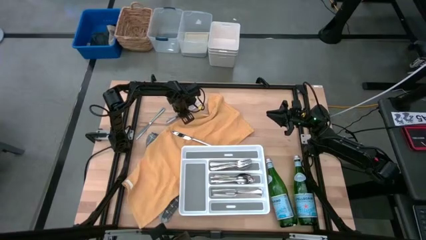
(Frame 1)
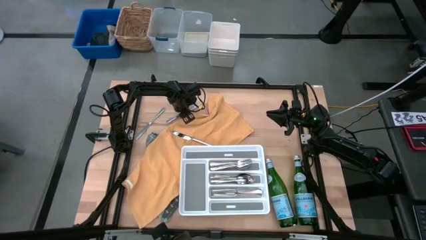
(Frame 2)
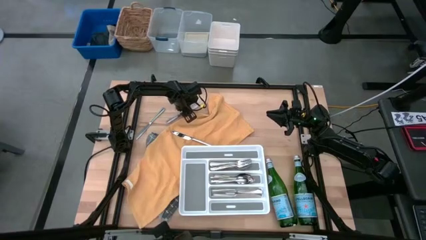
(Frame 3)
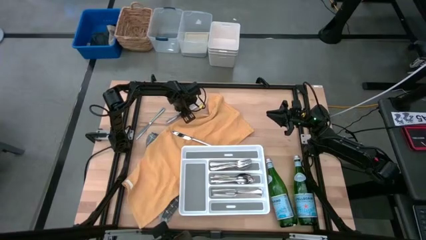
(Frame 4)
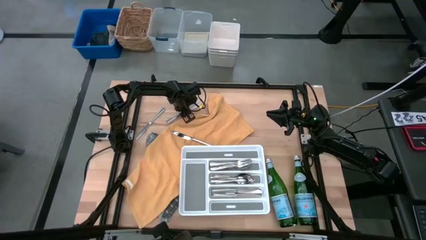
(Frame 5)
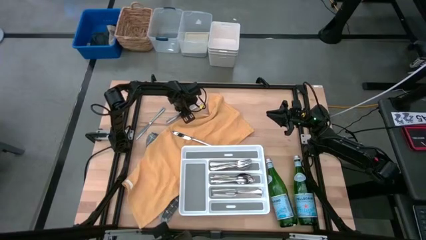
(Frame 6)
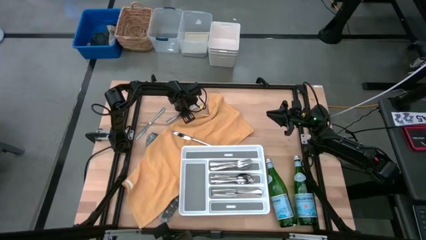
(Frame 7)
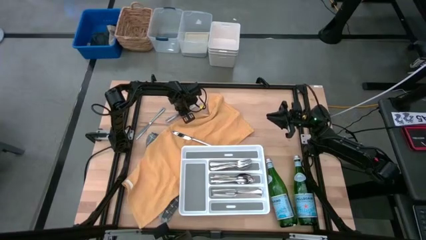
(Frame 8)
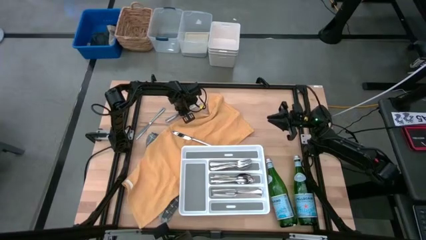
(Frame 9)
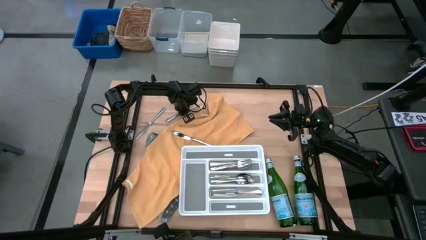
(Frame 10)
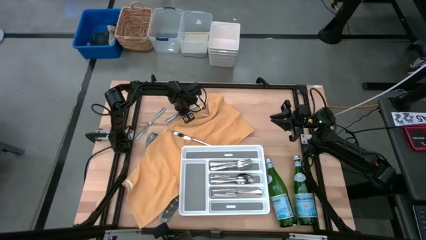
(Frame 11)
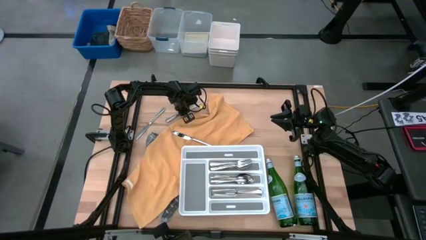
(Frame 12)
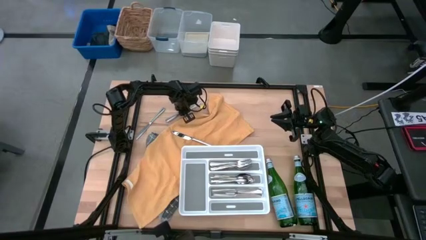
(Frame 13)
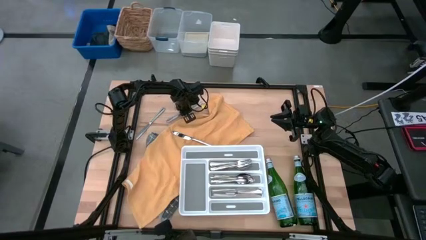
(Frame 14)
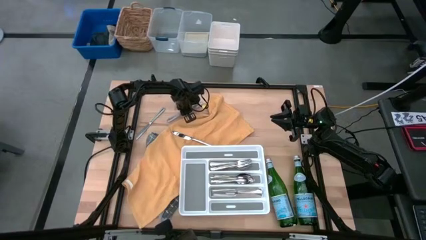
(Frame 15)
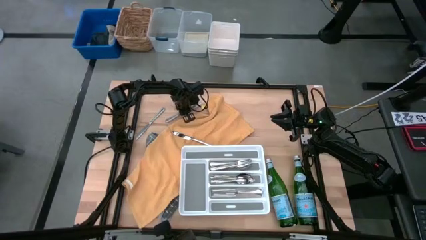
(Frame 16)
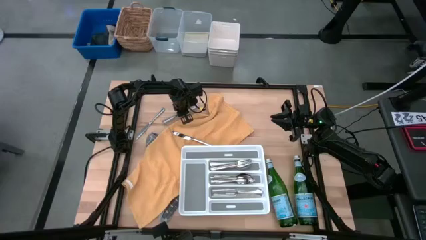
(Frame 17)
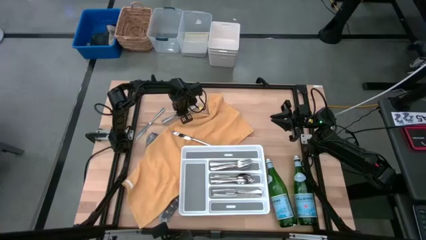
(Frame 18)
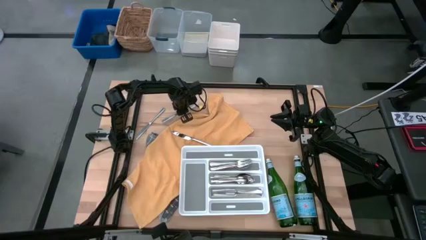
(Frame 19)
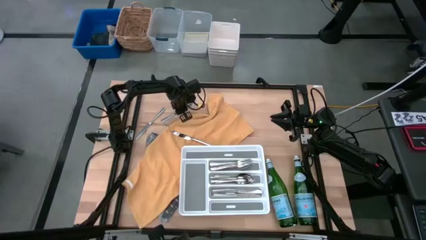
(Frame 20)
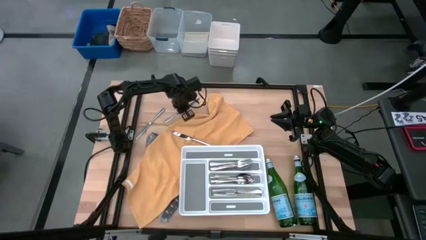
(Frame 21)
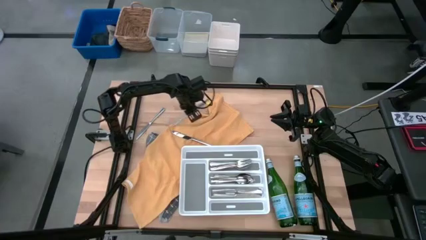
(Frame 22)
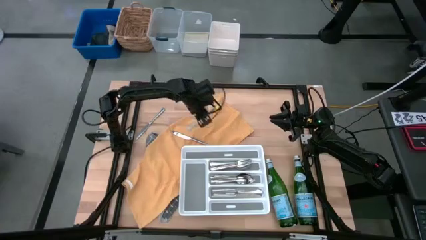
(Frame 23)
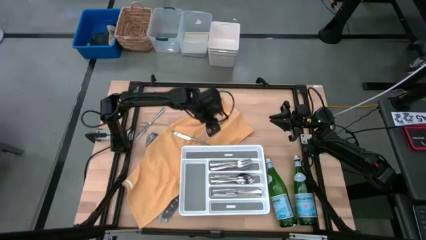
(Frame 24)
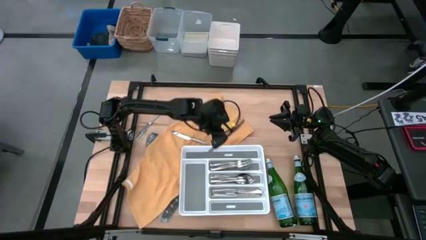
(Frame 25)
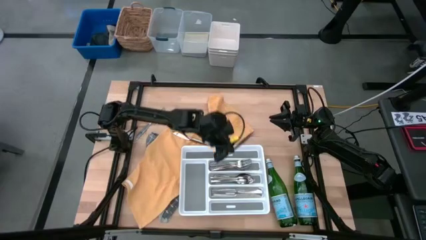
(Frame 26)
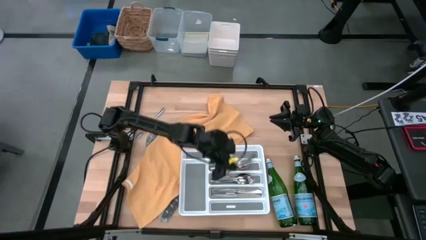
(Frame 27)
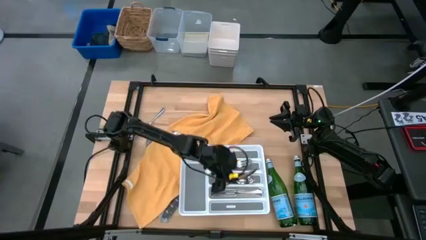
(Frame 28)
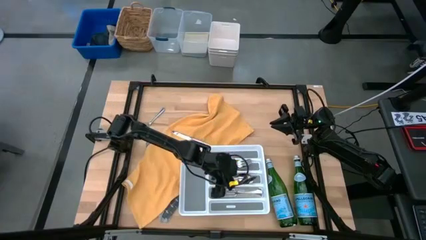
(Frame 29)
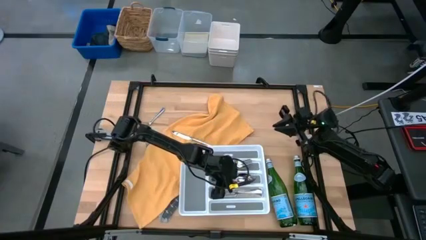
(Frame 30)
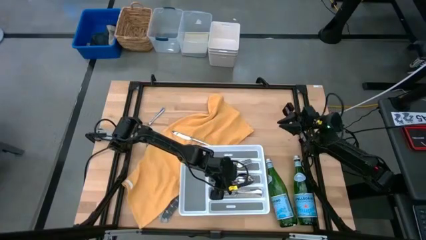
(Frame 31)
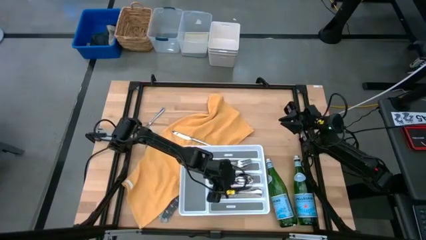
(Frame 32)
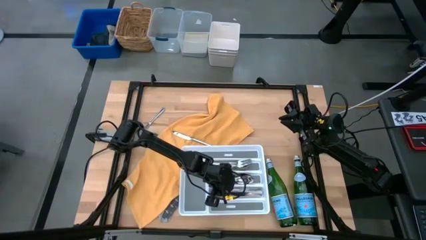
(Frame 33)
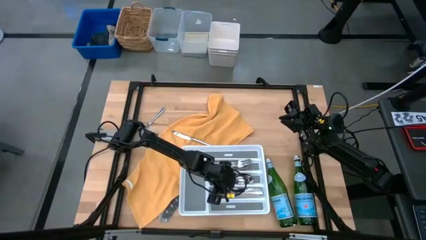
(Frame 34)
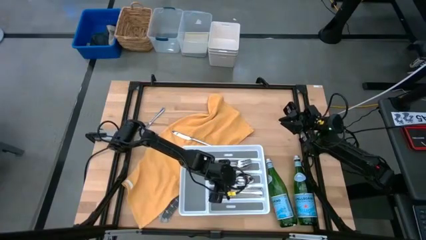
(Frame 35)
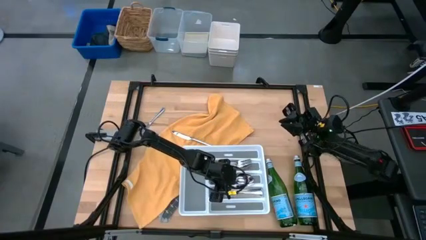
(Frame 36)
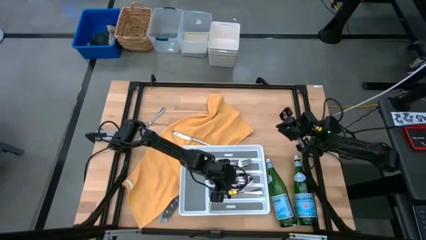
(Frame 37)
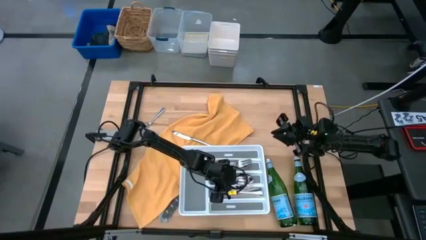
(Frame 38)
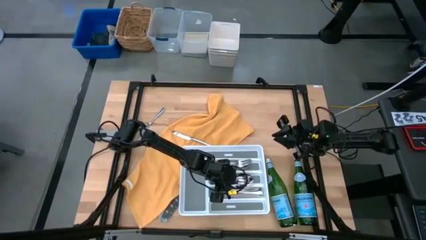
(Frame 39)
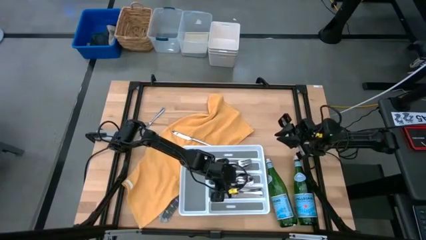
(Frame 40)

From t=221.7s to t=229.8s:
Task: Sort silverware
Put the silver table knife into the white silverware tray

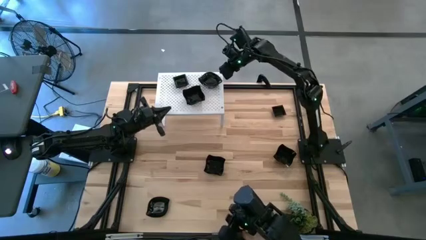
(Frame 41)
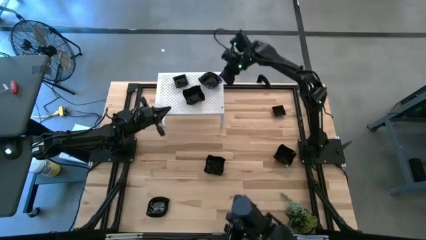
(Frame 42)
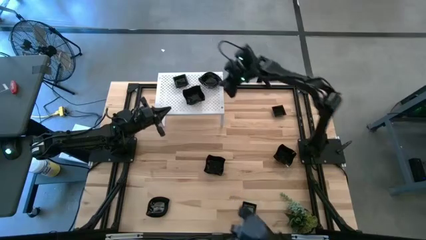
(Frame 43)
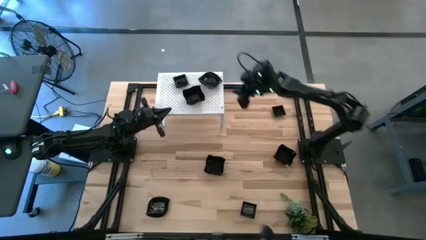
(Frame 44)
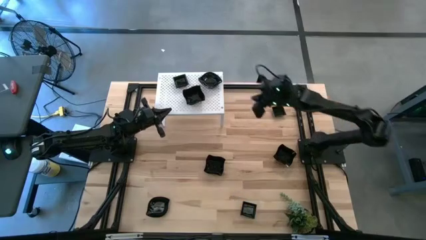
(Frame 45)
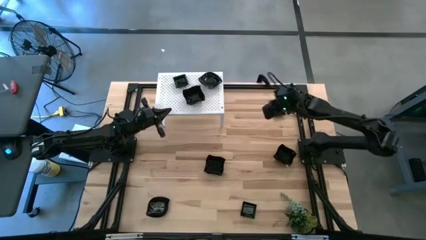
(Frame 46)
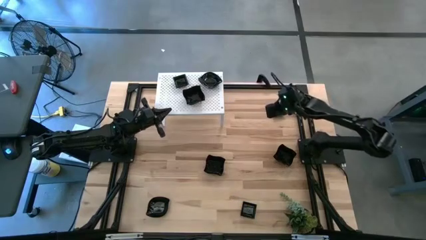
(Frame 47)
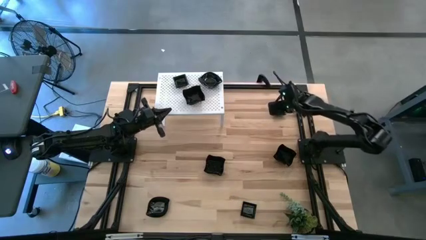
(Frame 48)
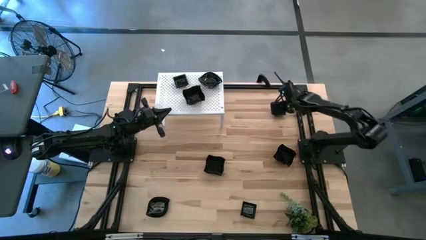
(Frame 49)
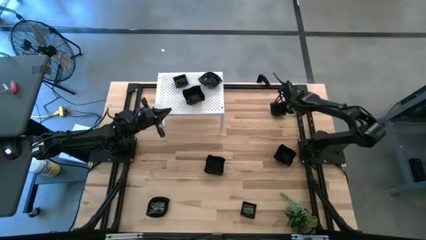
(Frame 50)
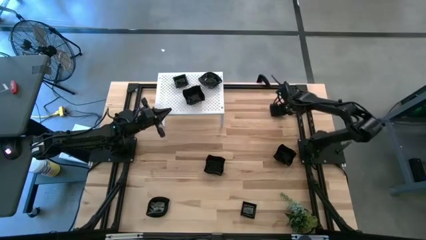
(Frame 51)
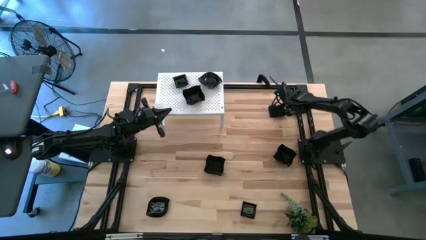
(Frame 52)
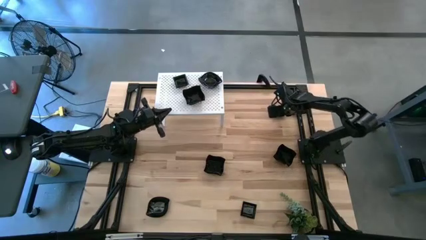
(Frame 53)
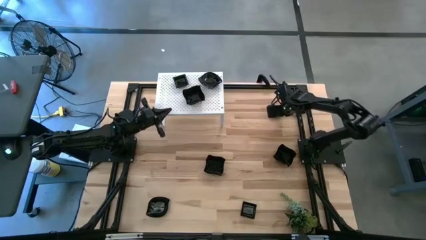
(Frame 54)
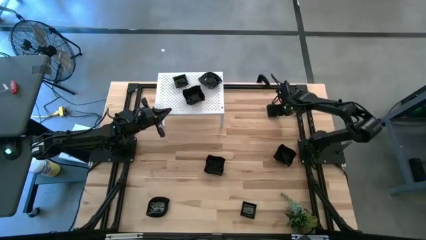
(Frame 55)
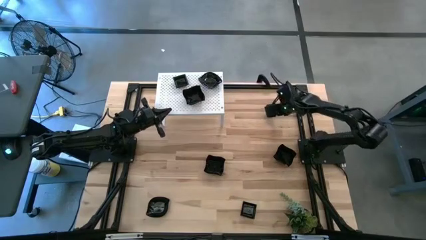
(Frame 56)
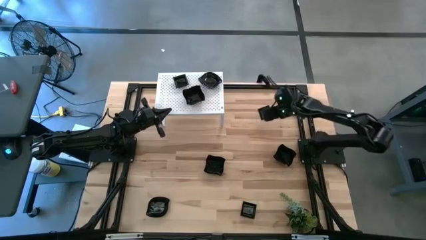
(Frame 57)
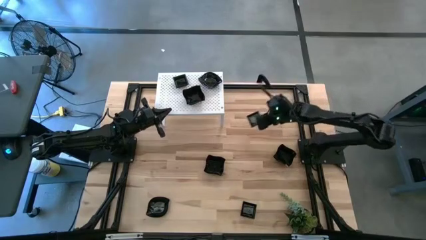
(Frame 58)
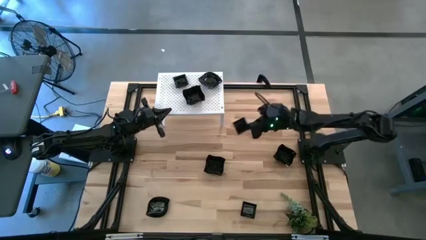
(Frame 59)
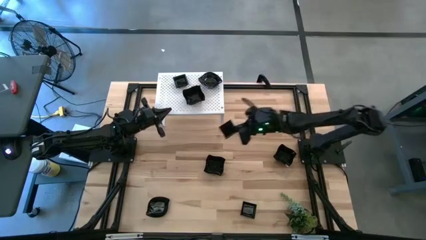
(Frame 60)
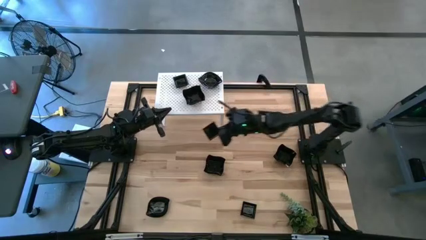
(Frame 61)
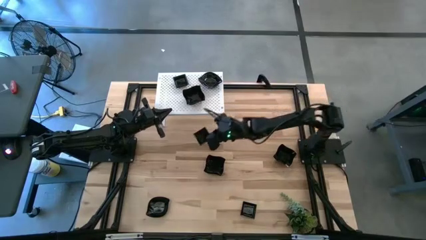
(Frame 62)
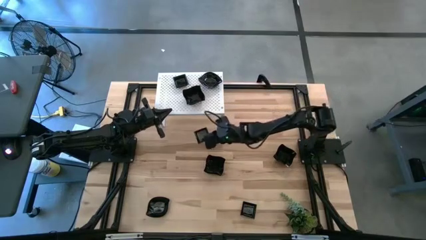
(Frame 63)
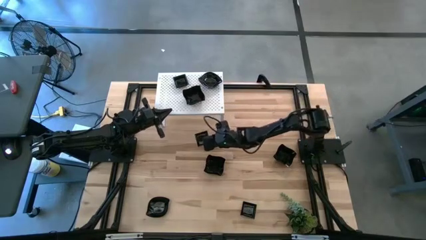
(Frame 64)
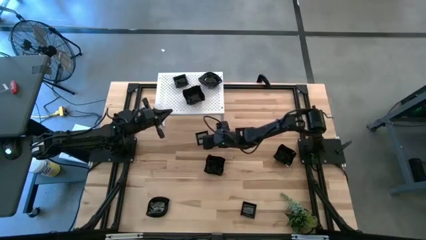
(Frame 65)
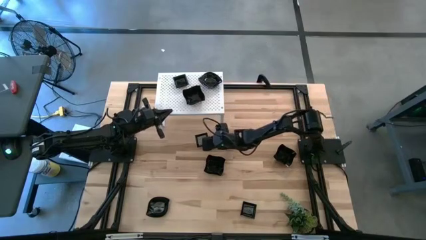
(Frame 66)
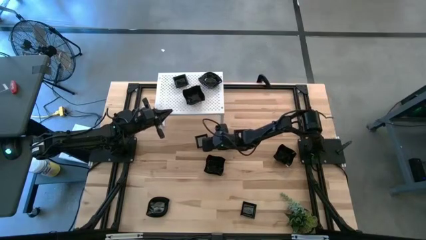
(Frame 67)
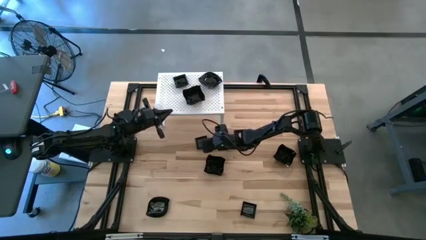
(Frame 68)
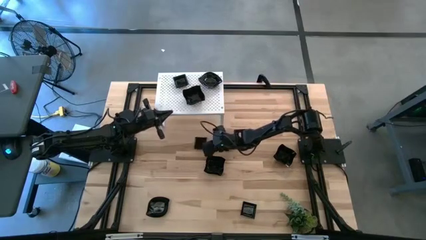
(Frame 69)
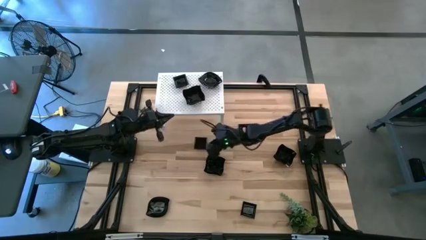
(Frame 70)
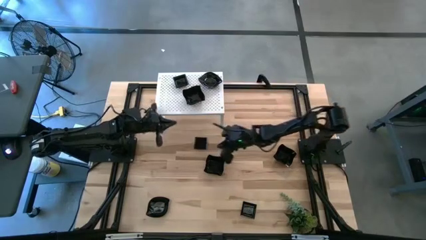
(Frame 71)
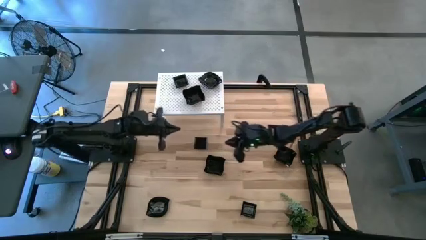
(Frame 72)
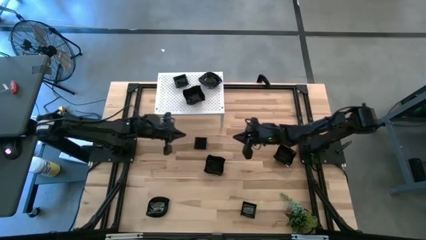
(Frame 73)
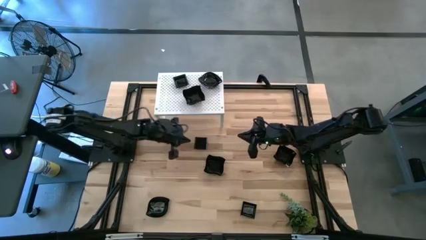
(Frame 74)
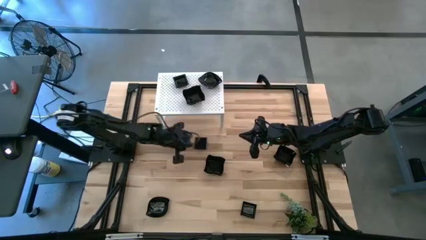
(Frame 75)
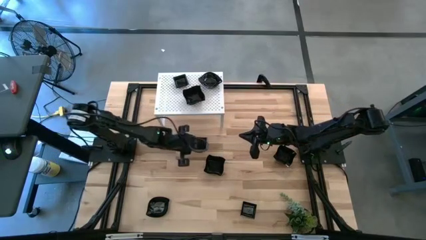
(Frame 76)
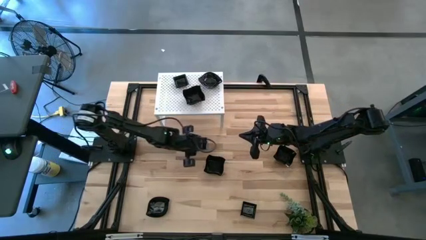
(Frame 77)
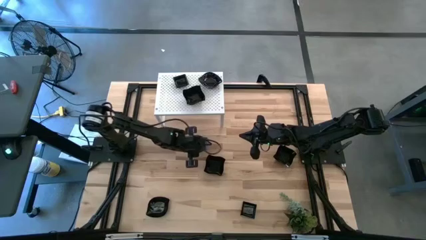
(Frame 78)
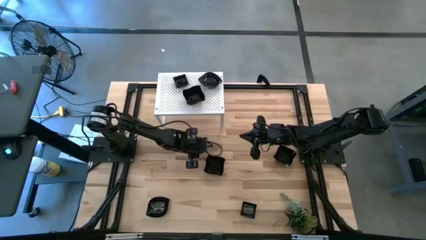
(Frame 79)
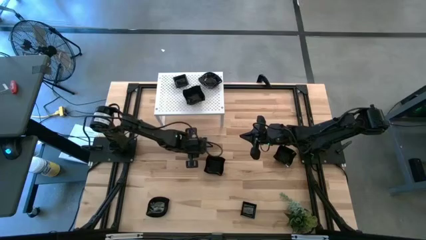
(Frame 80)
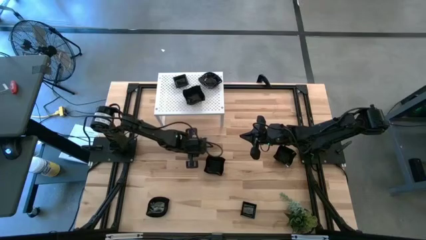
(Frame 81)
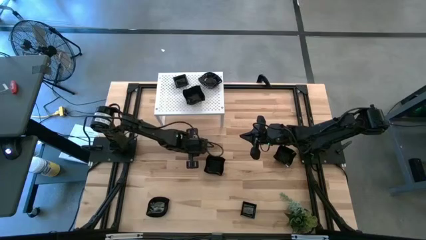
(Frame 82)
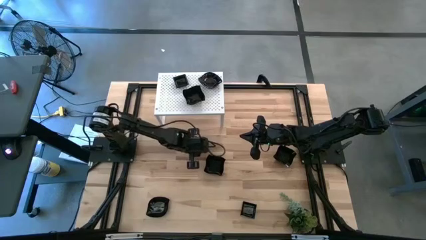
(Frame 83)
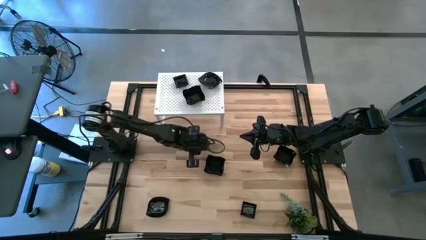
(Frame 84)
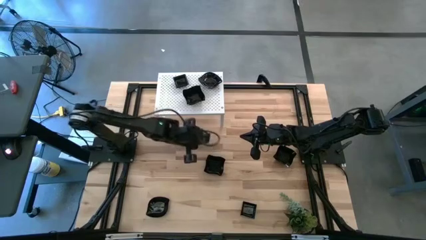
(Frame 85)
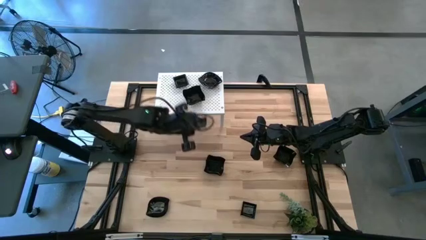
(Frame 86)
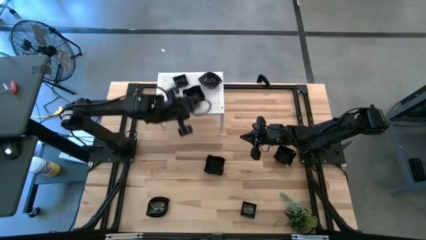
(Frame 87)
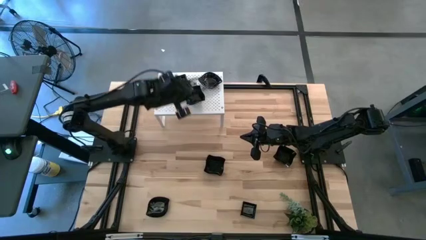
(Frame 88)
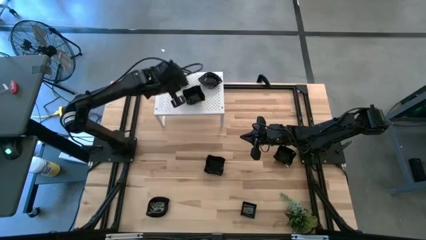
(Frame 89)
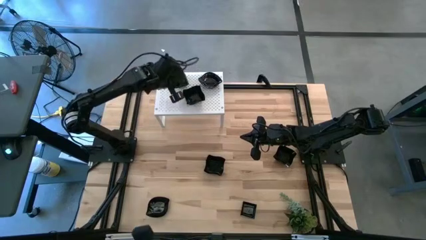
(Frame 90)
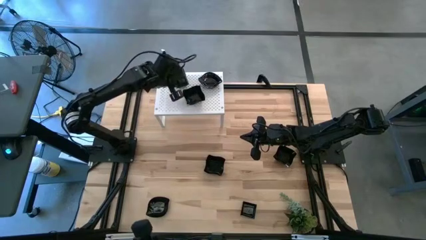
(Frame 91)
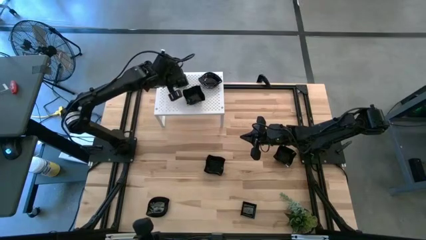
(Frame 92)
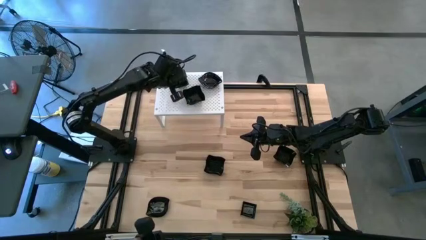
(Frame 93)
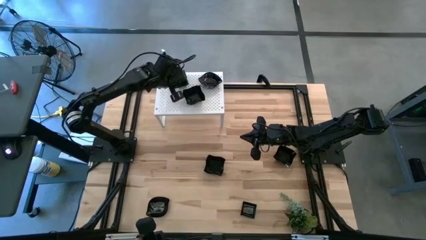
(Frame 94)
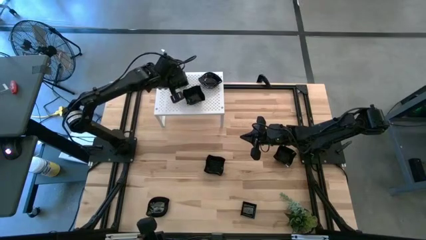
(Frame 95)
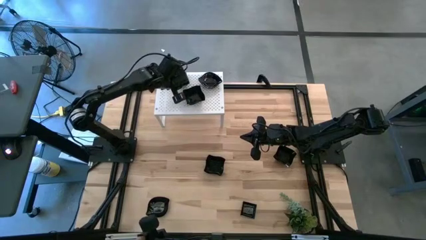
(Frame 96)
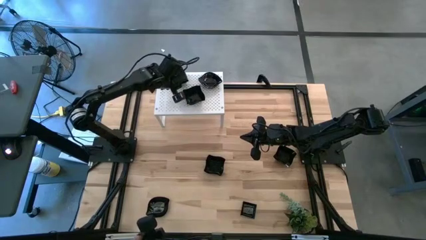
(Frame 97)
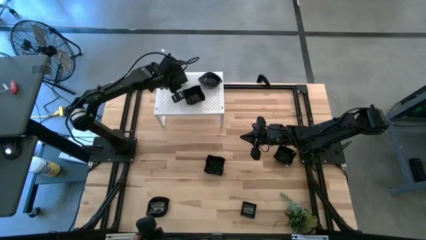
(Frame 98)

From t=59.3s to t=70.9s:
Task: Pick & Place Mini shaped plates
Stack the black square plate on top of the black square plates on the shelf
